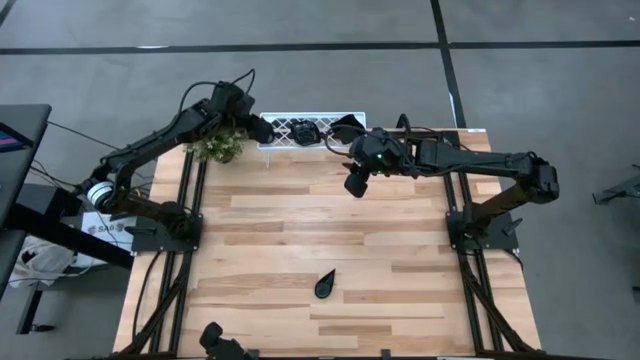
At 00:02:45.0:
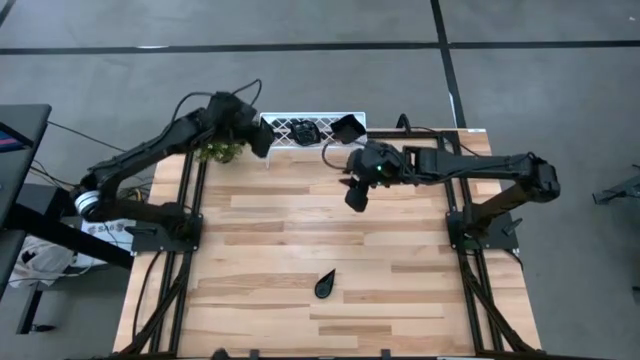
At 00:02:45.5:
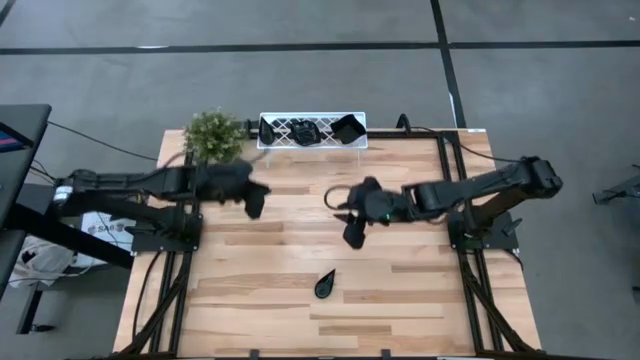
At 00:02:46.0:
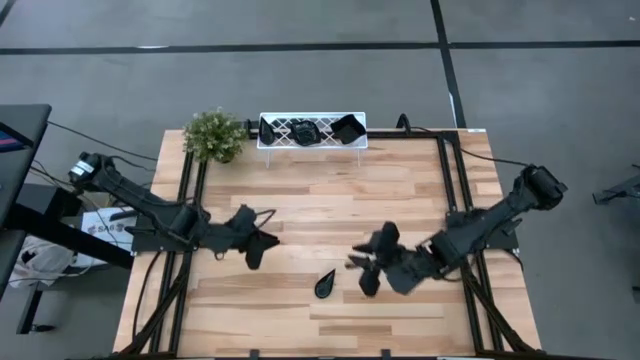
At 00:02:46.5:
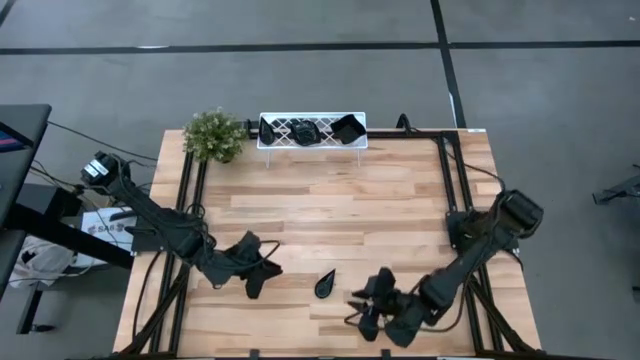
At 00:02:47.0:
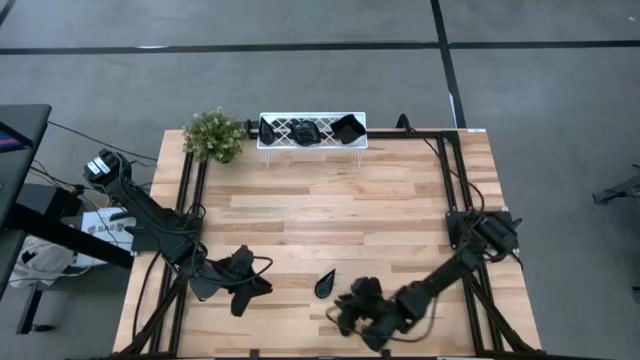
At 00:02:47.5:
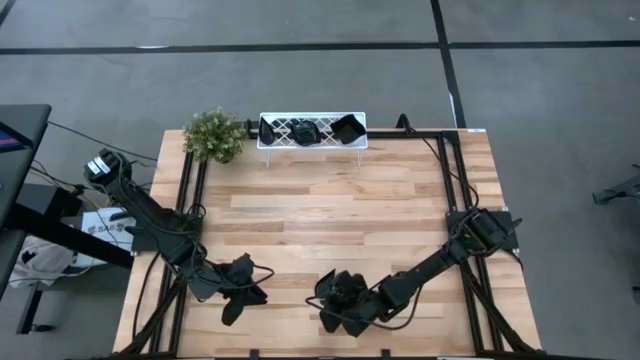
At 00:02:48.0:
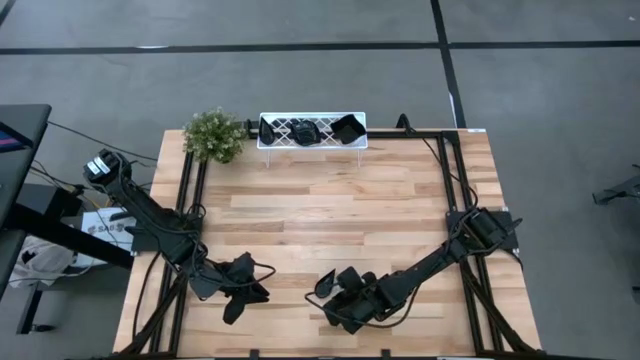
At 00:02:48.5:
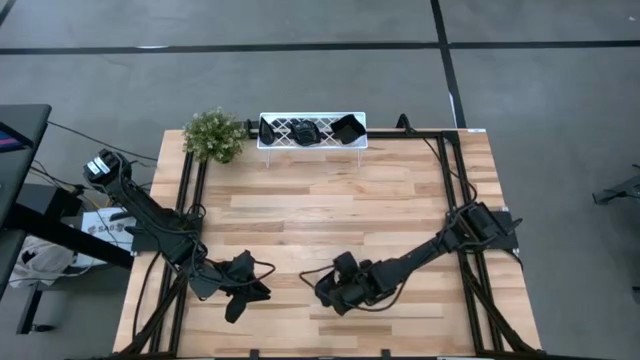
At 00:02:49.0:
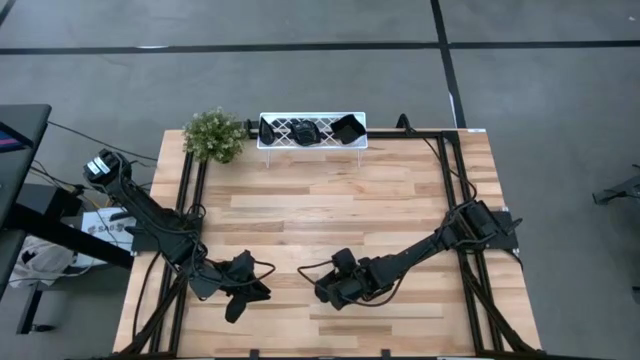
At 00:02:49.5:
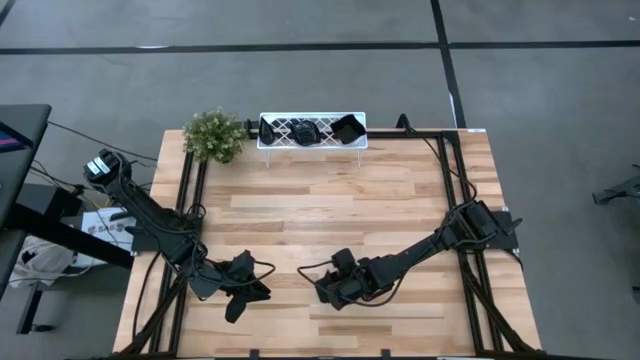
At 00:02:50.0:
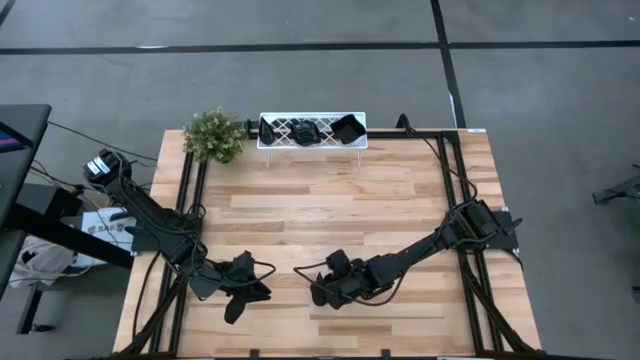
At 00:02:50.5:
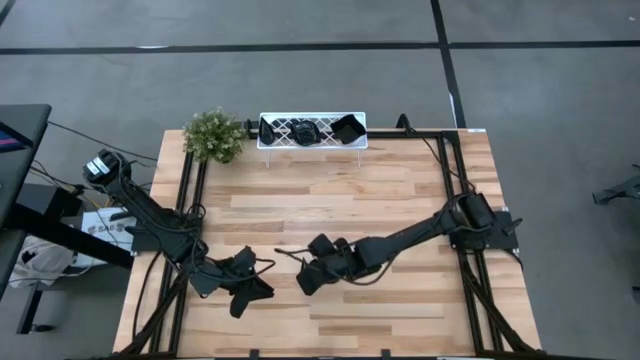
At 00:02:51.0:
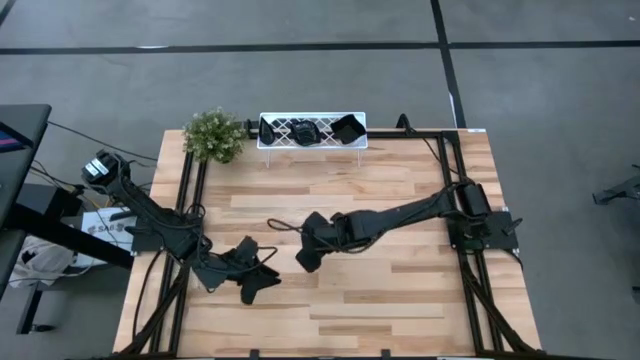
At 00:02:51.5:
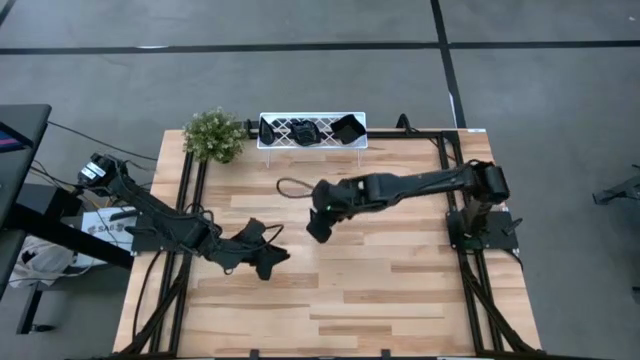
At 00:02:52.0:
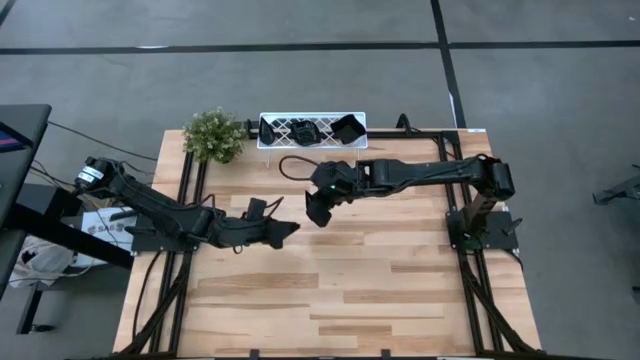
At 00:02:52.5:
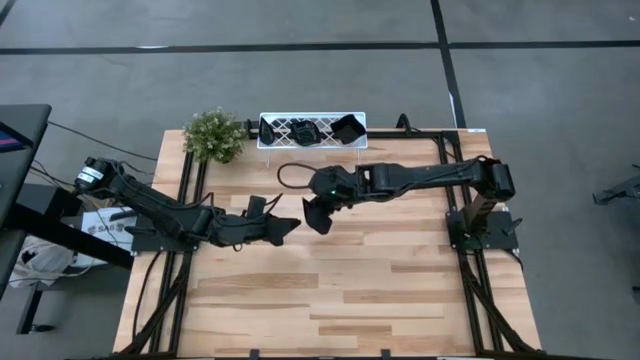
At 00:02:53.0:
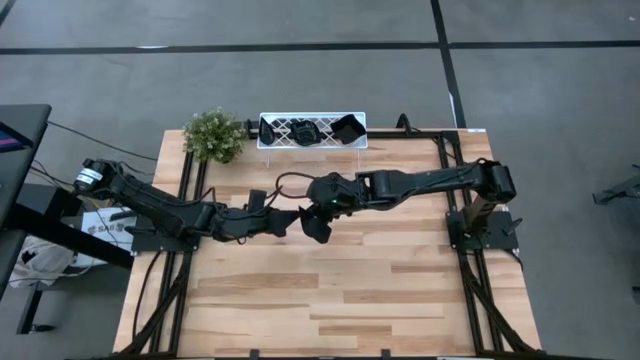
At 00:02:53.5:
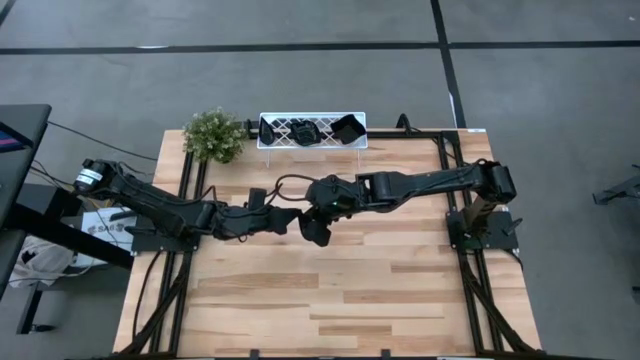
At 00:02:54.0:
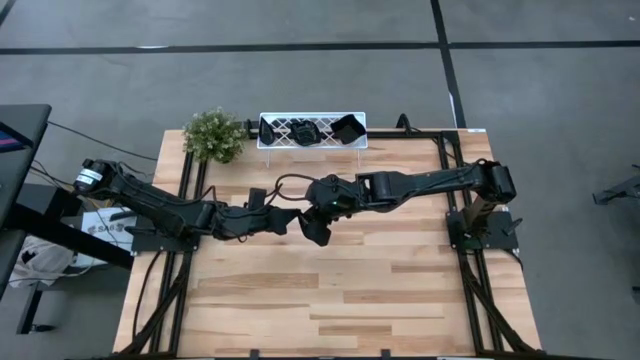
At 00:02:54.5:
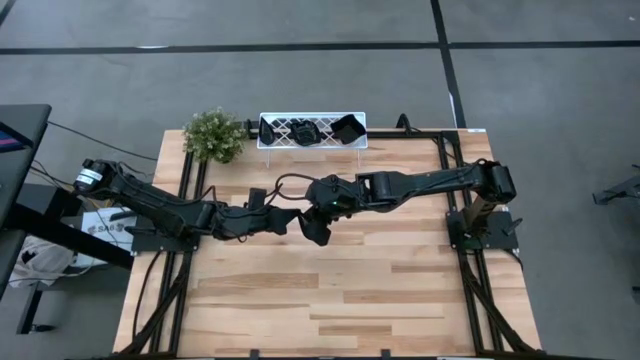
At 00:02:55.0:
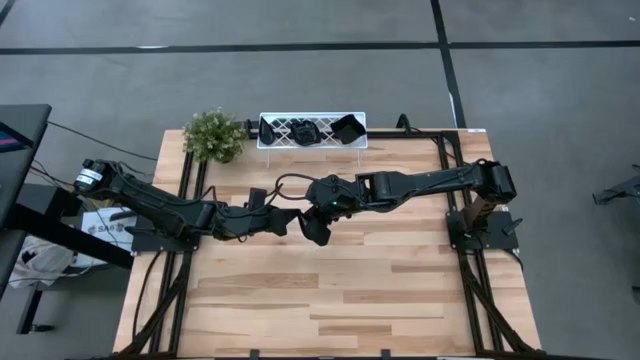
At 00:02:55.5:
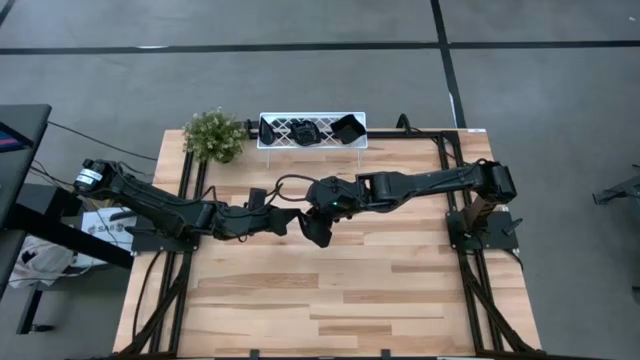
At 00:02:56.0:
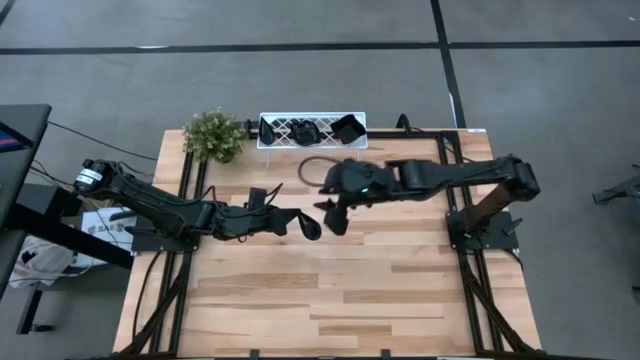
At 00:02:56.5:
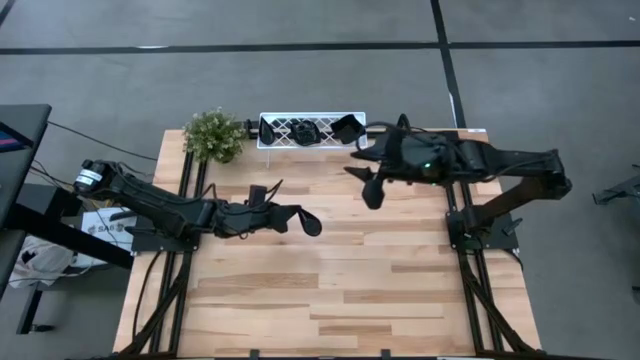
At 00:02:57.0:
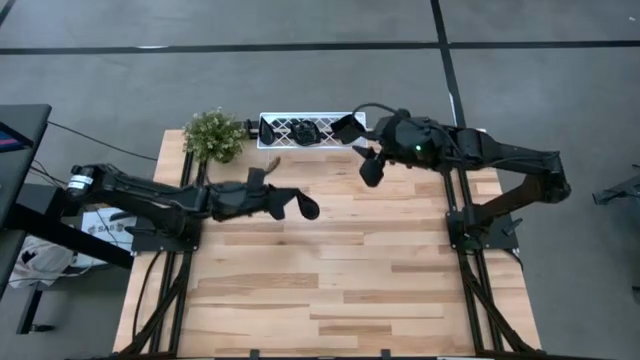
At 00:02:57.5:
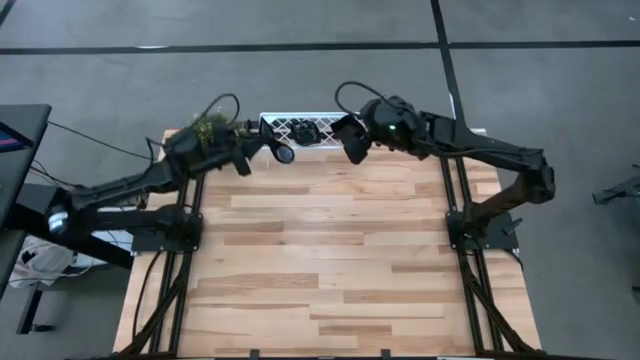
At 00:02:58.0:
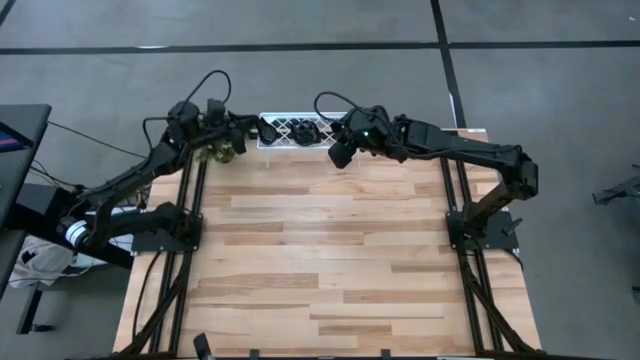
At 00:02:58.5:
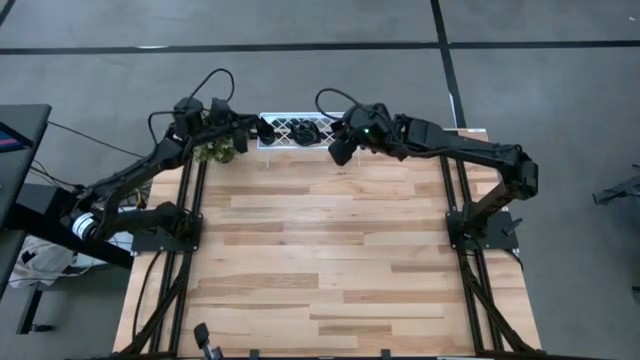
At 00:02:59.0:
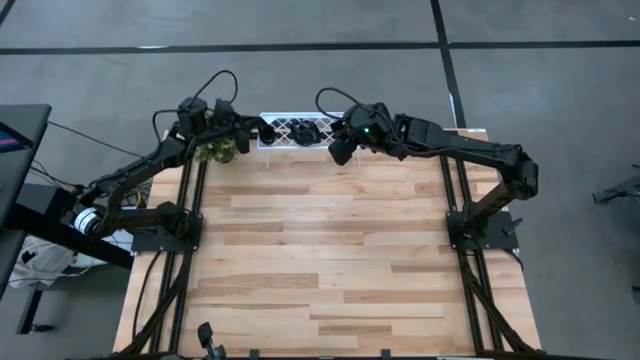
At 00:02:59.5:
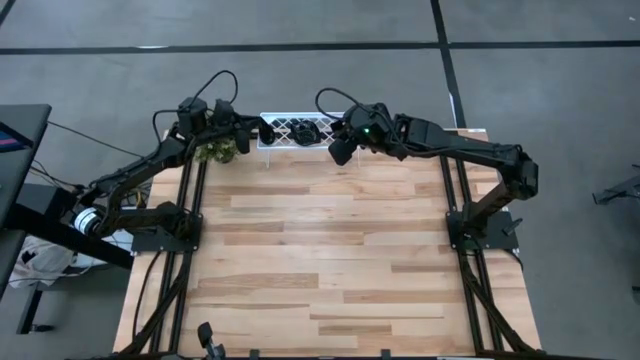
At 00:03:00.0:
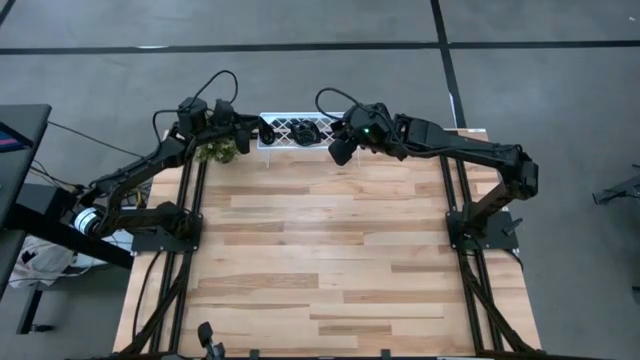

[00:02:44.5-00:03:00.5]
Task: Pick & Place Mini shaped plates
Stack the drop shaped plate on the top of the drop shaped plates on the shelf

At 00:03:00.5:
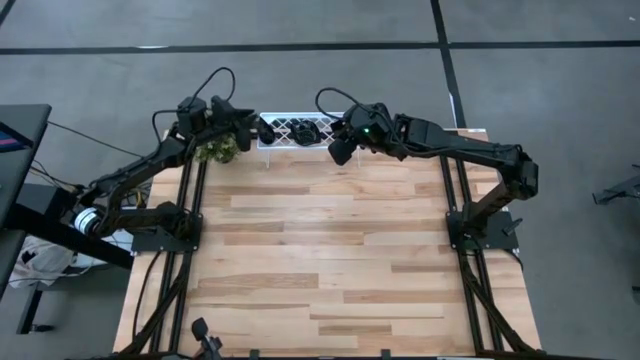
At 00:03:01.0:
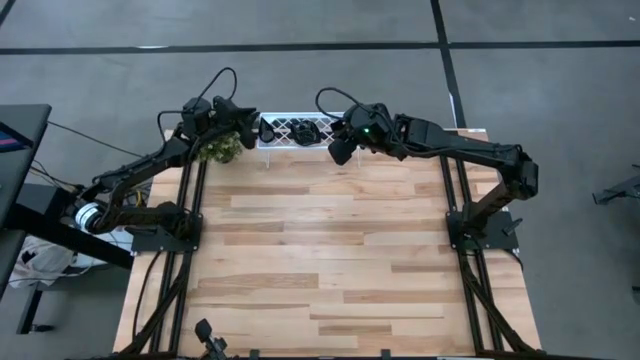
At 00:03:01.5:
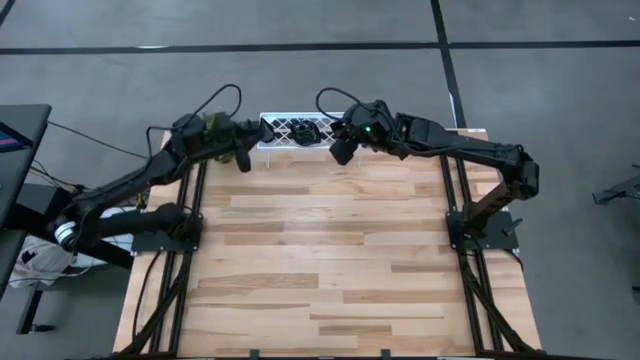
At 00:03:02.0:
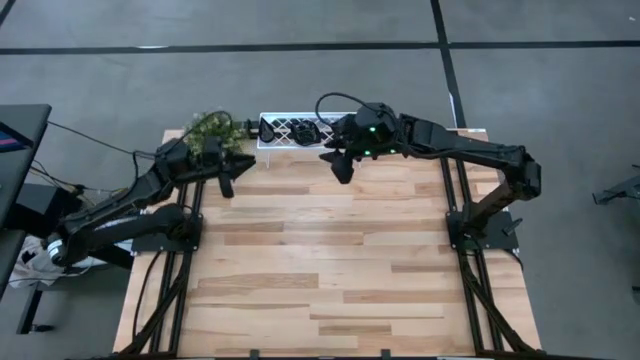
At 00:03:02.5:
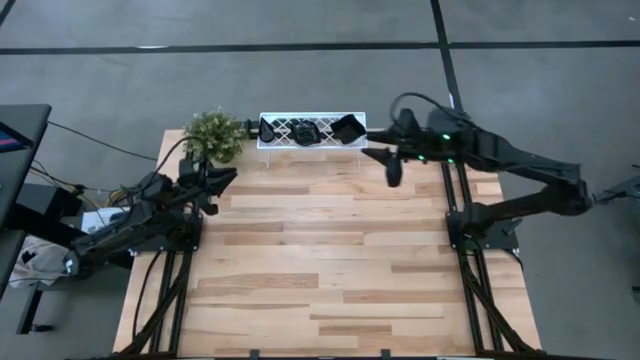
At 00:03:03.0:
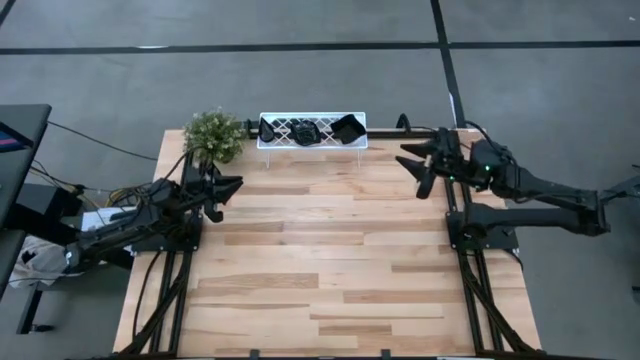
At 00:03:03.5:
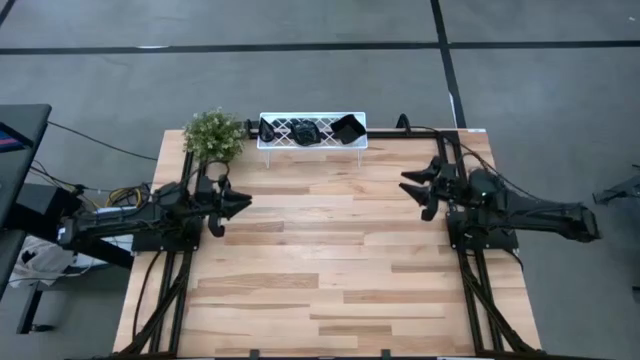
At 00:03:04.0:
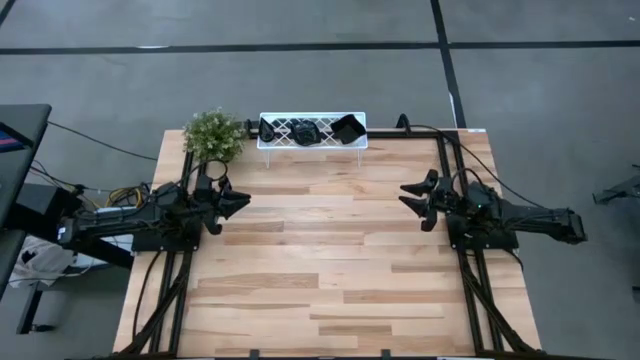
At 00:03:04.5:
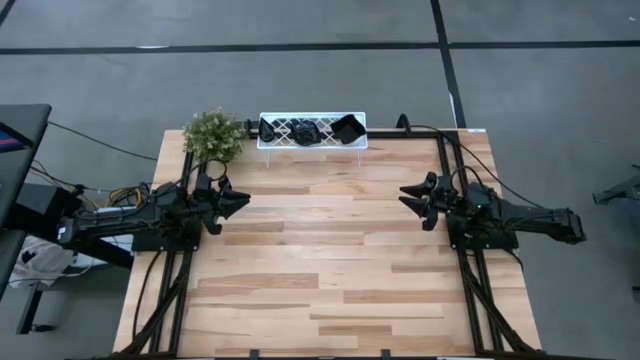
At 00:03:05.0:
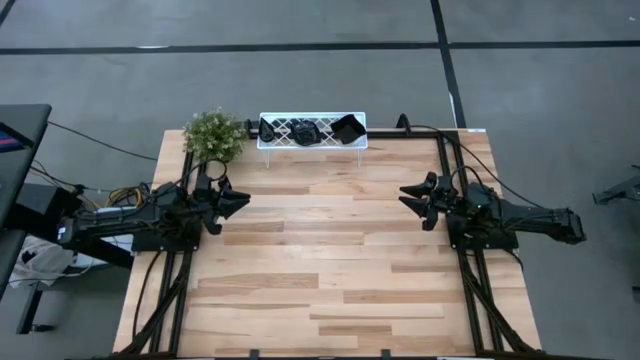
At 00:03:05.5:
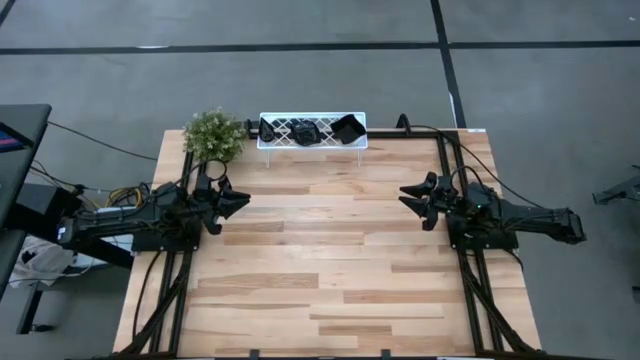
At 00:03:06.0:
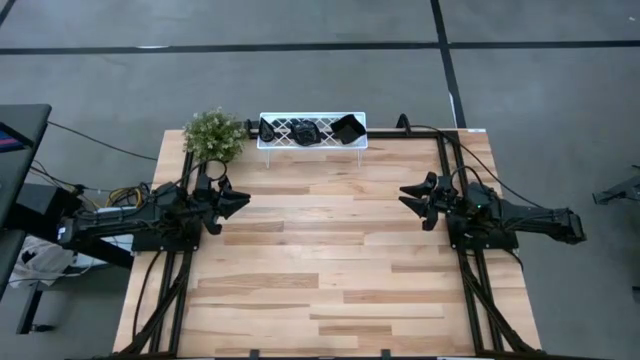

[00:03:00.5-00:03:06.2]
Return to Home Position
